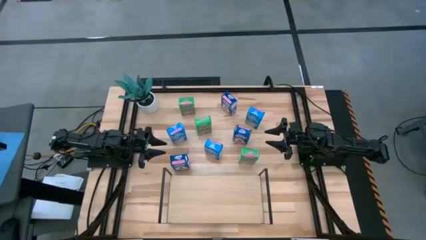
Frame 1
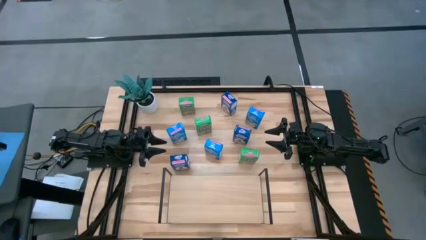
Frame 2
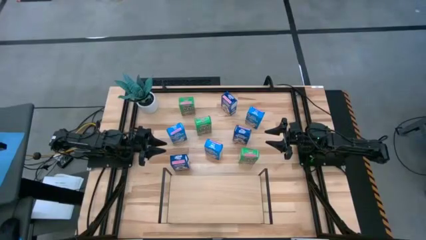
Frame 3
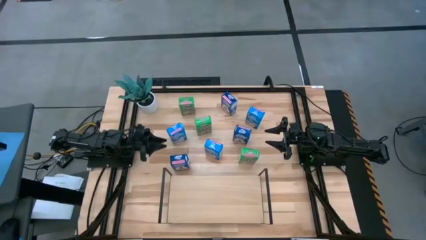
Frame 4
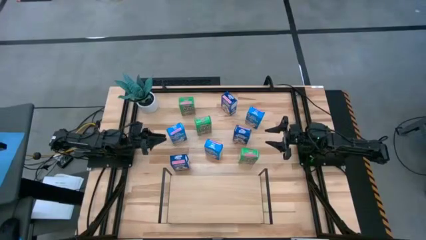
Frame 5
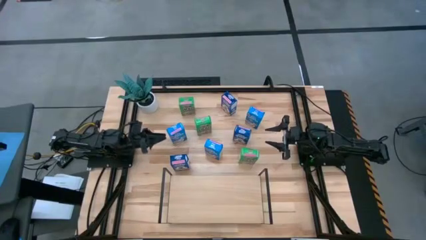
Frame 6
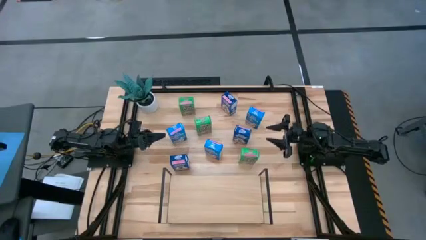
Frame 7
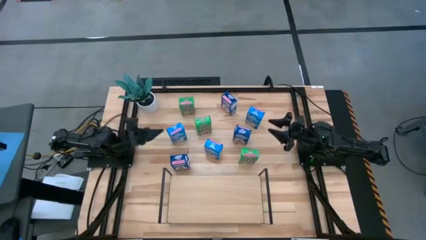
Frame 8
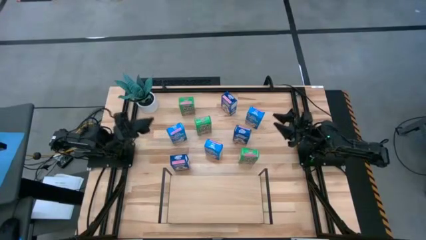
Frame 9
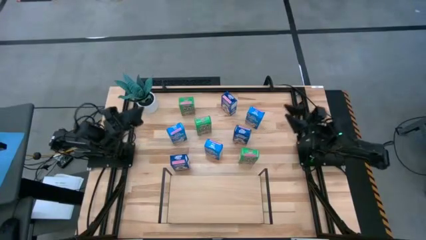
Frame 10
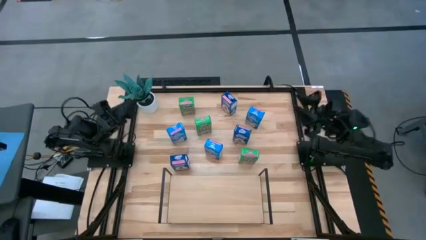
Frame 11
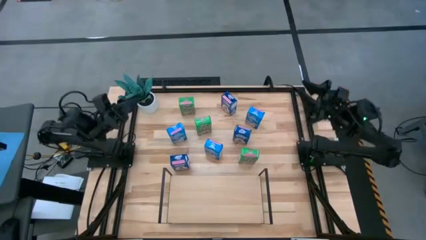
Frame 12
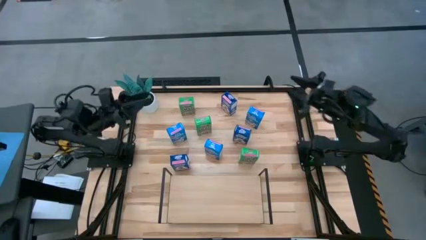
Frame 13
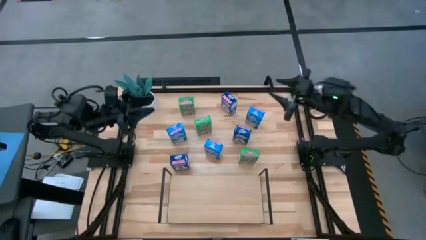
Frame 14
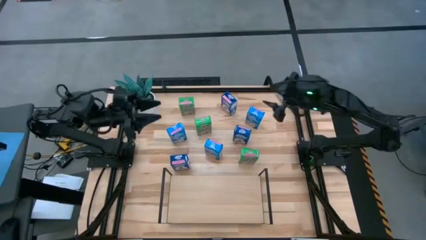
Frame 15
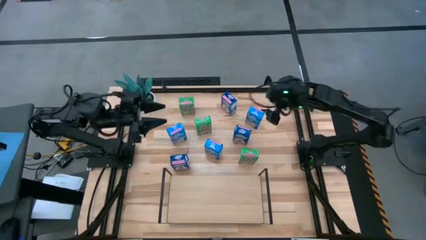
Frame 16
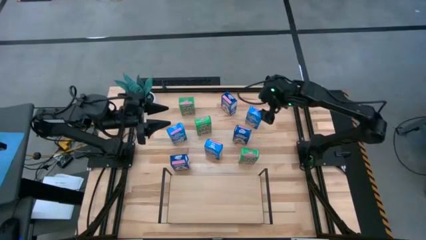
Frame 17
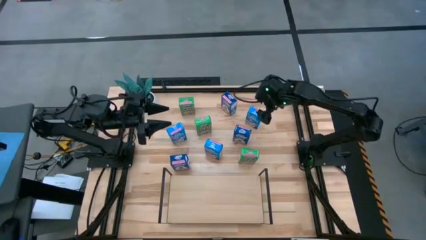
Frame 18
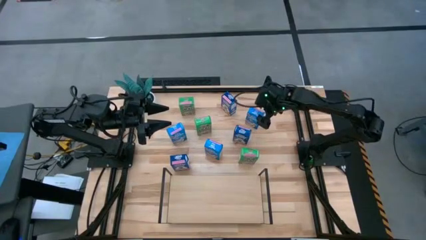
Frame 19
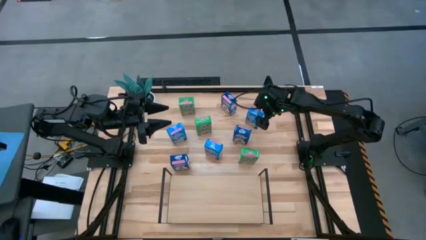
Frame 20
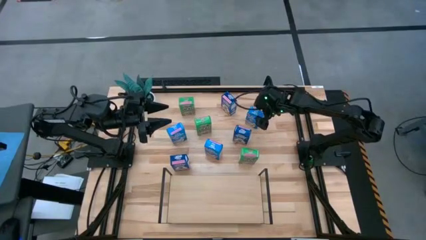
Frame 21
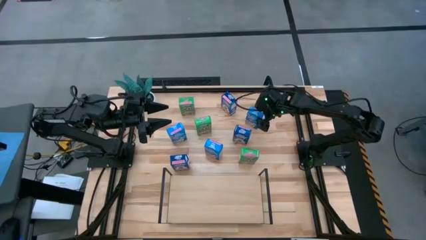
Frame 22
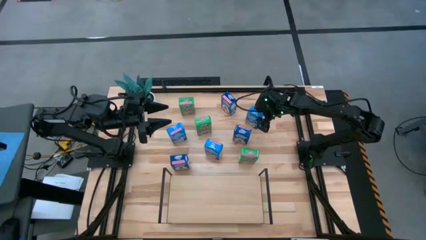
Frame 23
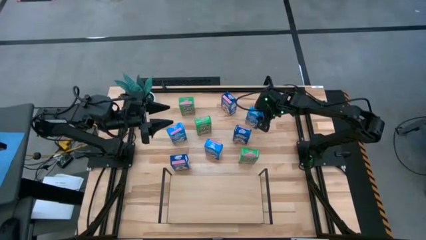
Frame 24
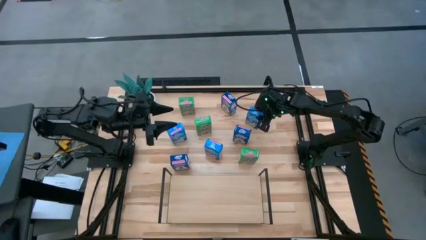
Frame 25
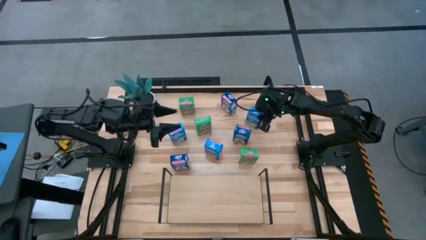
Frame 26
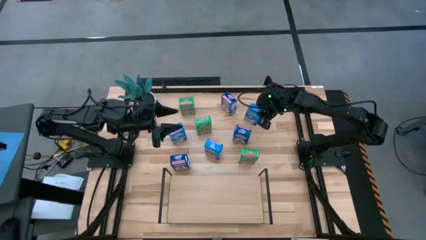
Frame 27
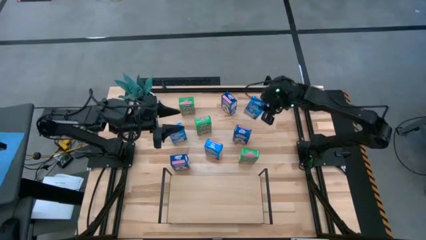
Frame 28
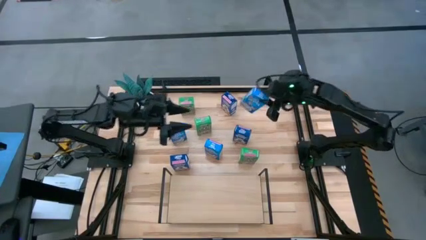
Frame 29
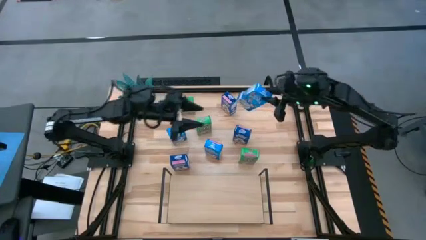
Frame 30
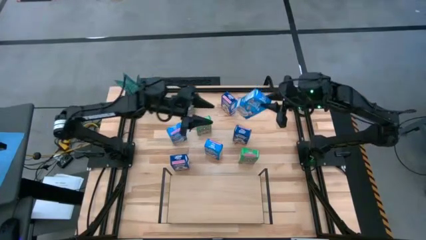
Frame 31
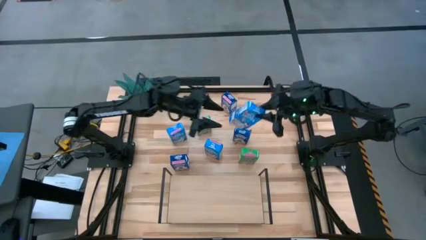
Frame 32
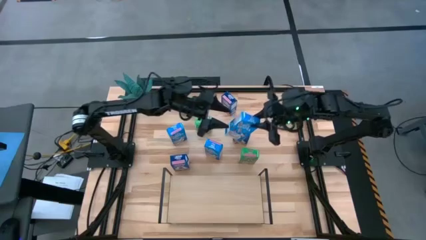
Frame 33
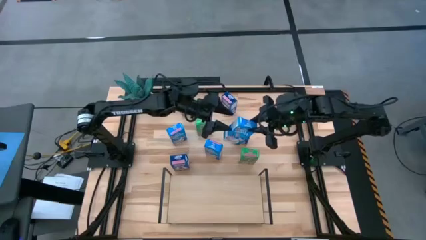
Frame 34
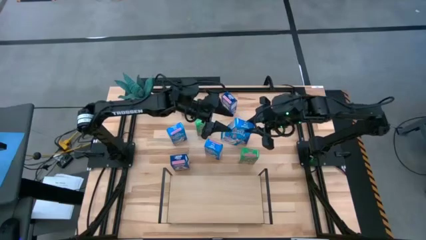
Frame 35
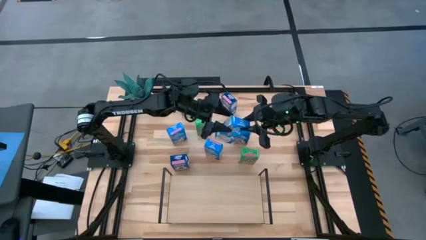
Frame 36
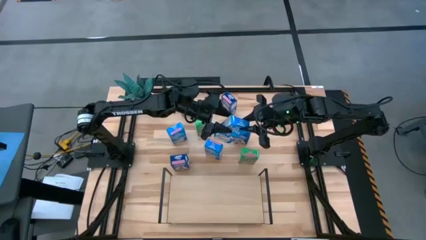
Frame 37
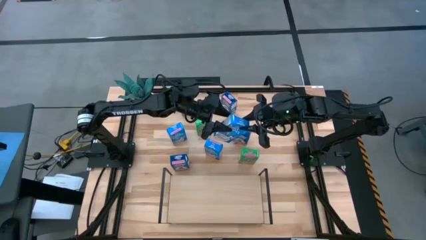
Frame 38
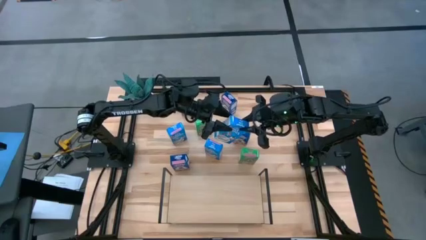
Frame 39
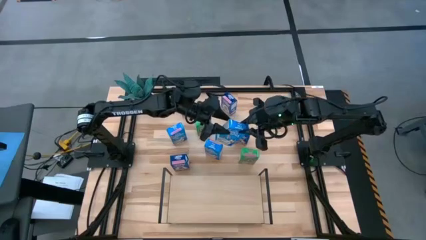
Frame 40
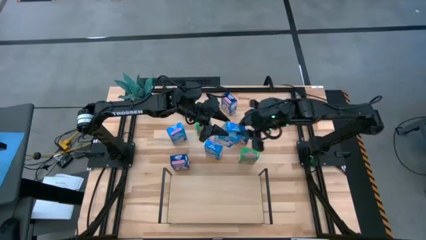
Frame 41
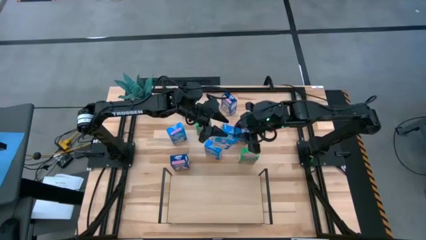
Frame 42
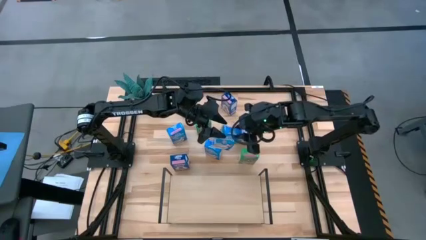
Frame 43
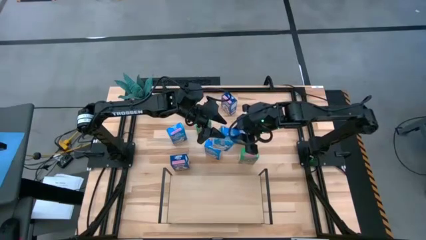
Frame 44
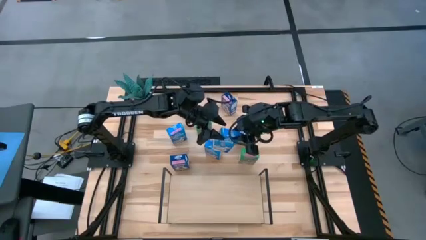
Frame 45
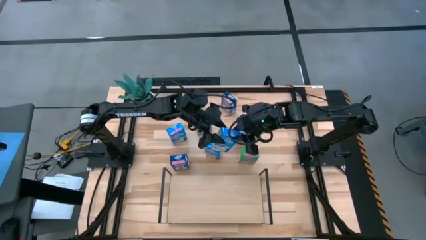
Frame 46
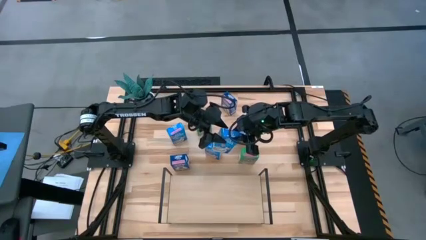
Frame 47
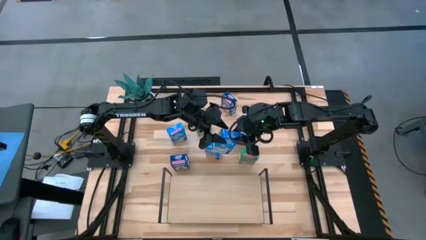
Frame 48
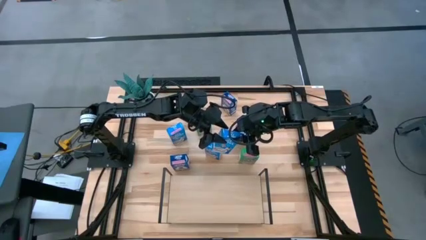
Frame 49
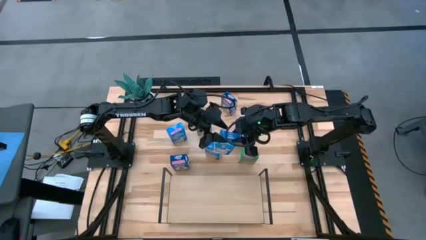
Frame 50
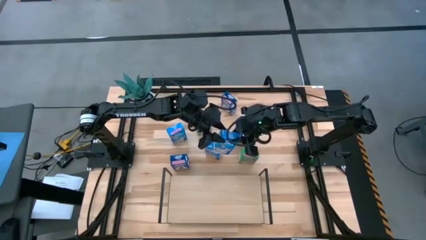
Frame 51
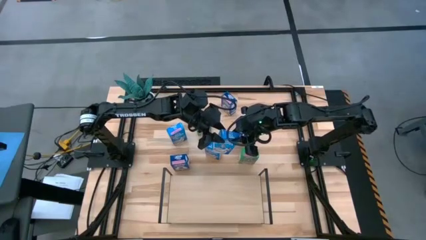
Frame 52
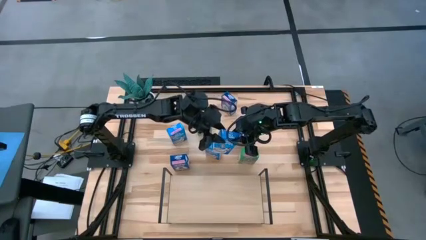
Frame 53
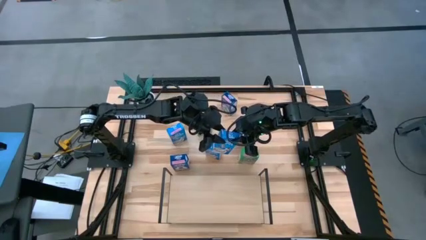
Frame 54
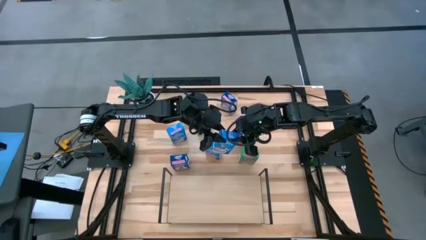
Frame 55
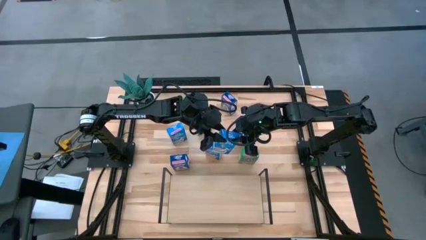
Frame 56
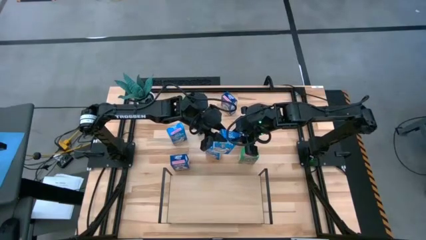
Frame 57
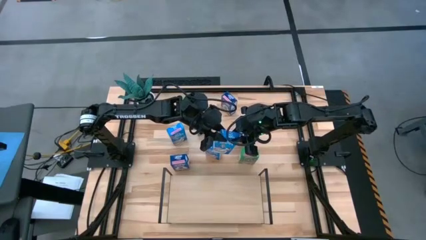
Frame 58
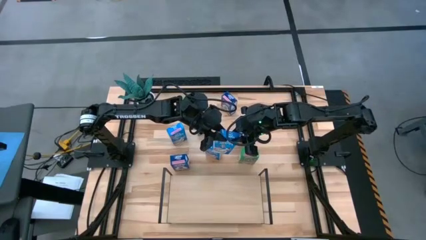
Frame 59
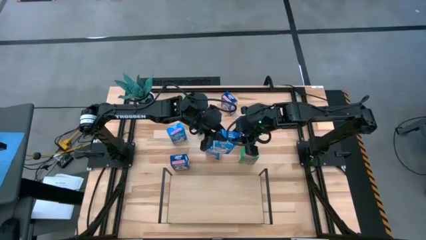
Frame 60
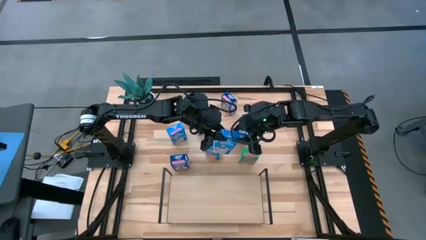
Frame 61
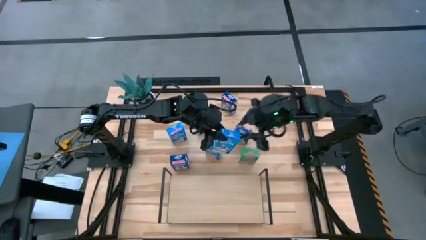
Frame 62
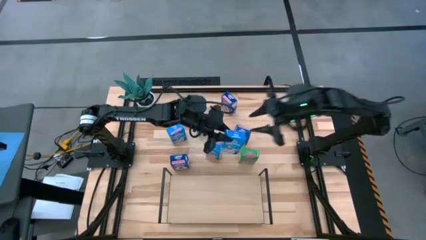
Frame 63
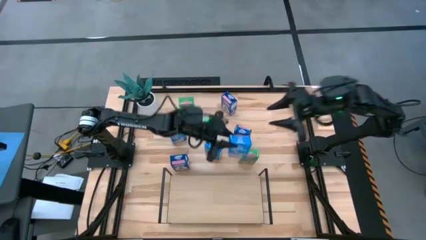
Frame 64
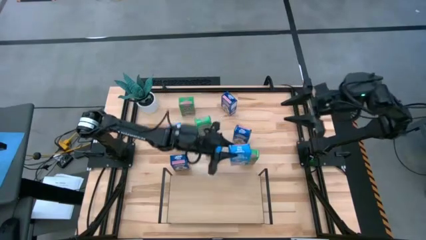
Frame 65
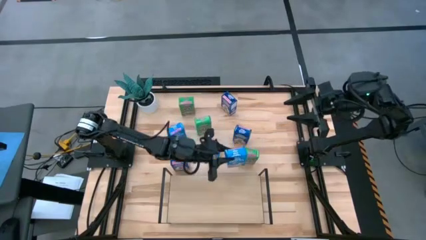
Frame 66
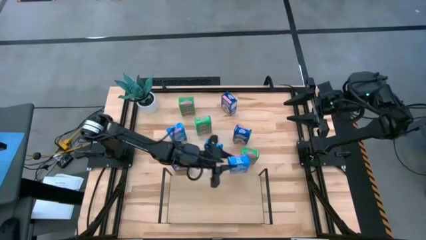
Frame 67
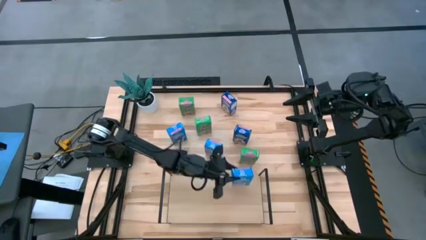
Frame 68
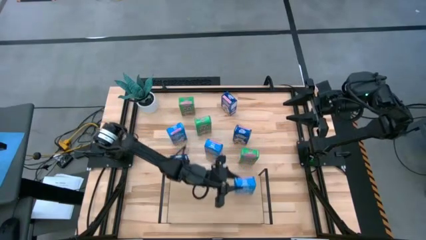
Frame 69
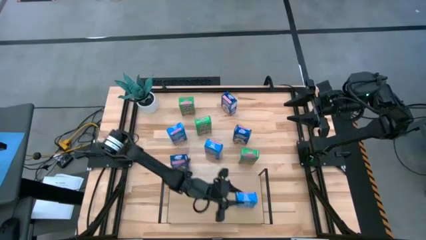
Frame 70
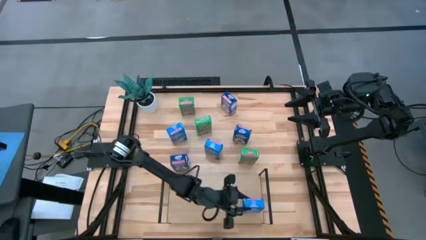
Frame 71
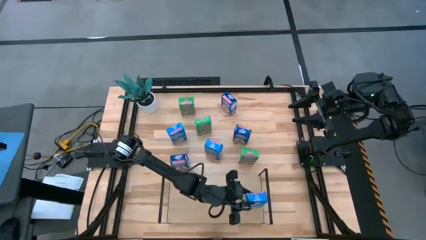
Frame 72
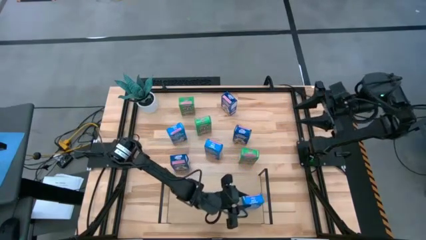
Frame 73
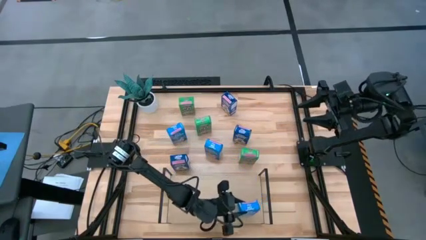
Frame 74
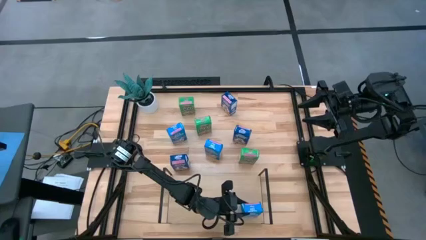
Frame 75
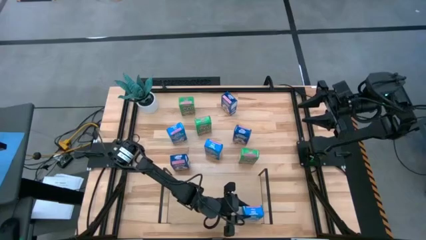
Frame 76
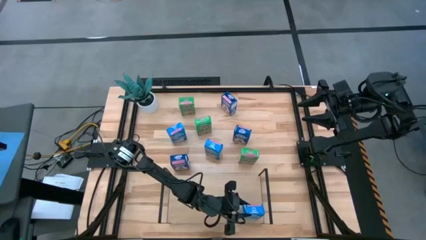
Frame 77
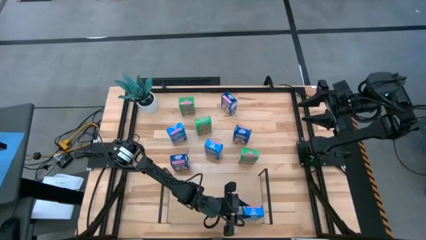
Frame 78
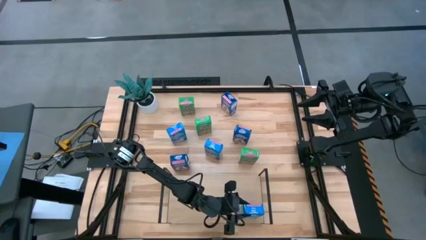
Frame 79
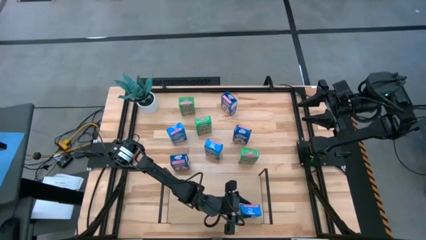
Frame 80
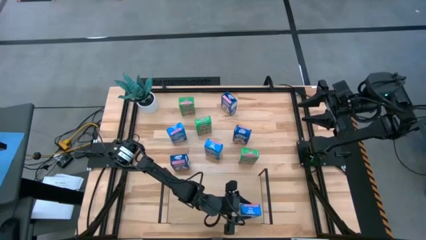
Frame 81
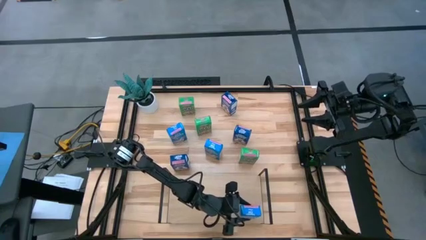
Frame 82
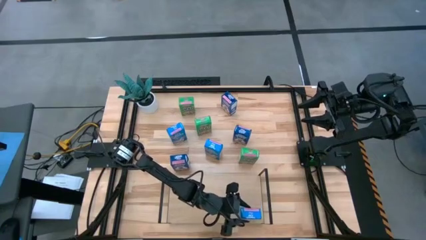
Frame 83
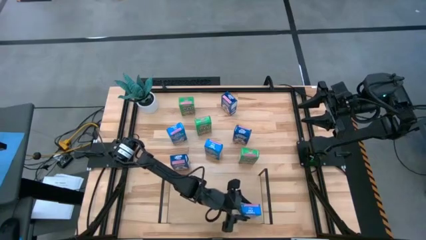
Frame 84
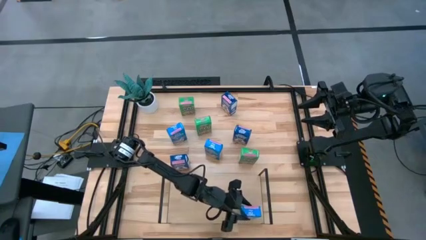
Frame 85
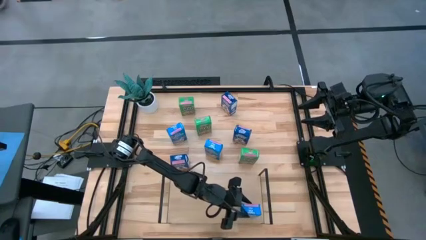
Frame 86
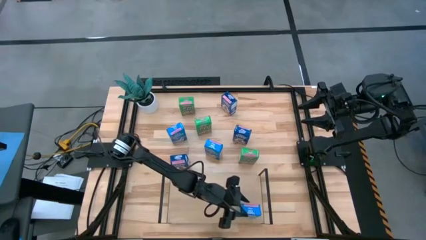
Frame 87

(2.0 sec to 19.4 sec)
Task: Stack cereal on shelf
Put the top light blue cereal box on the shelf
